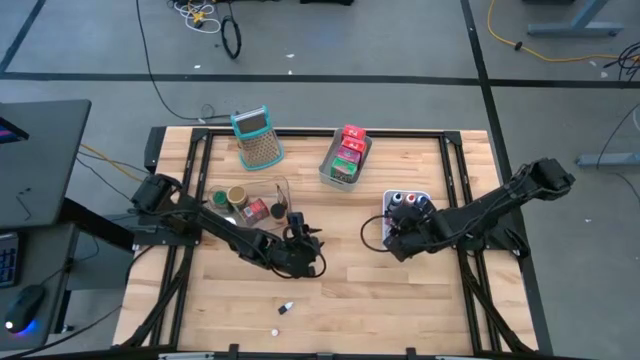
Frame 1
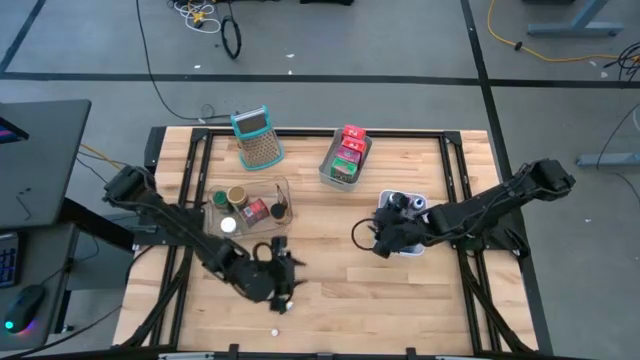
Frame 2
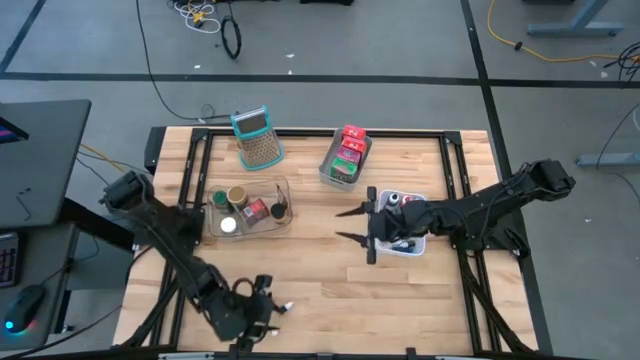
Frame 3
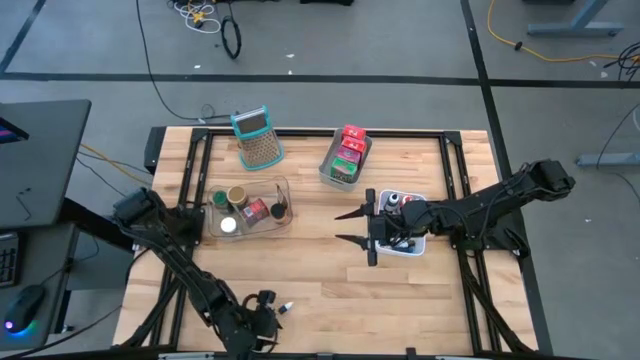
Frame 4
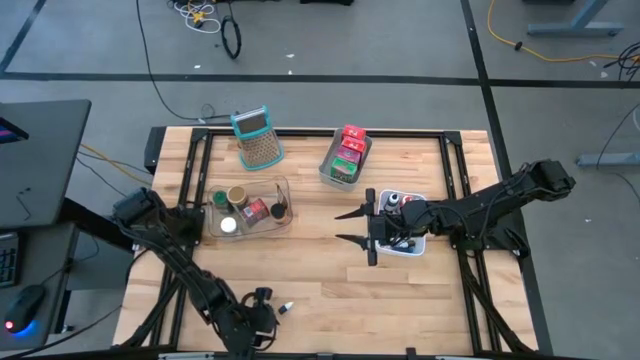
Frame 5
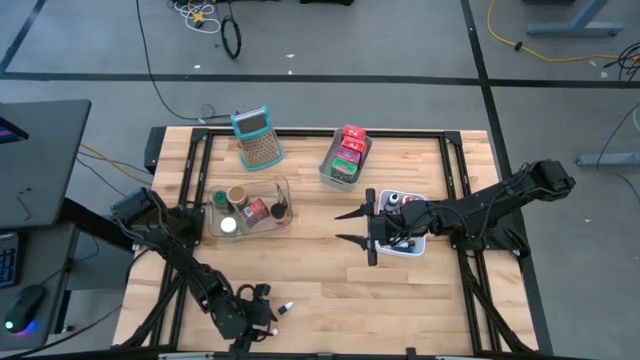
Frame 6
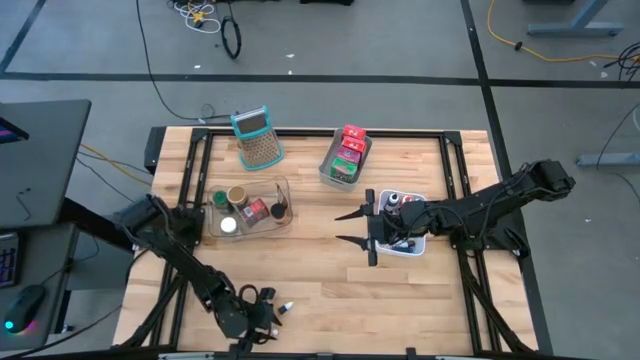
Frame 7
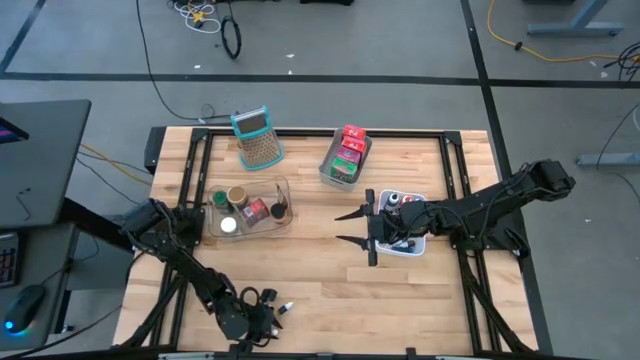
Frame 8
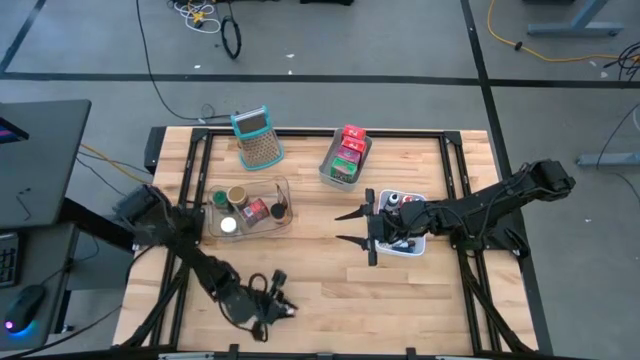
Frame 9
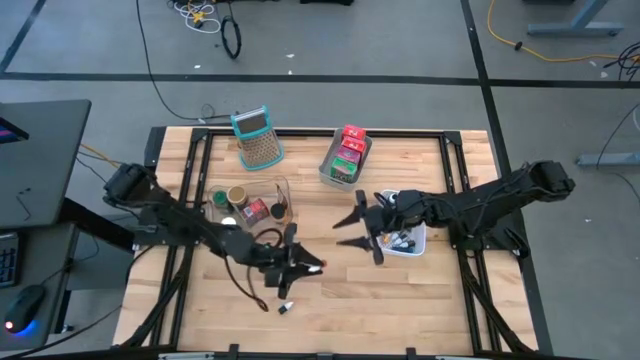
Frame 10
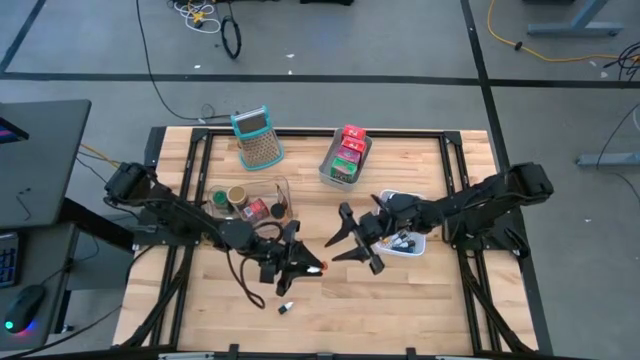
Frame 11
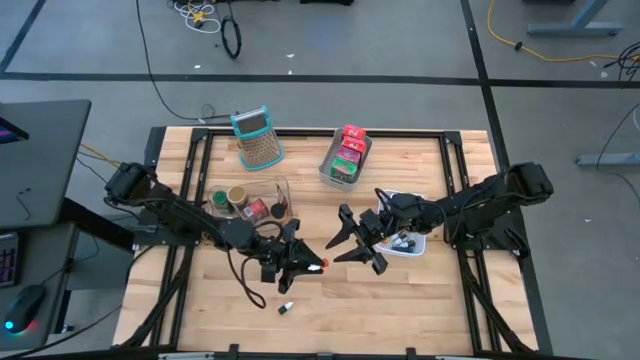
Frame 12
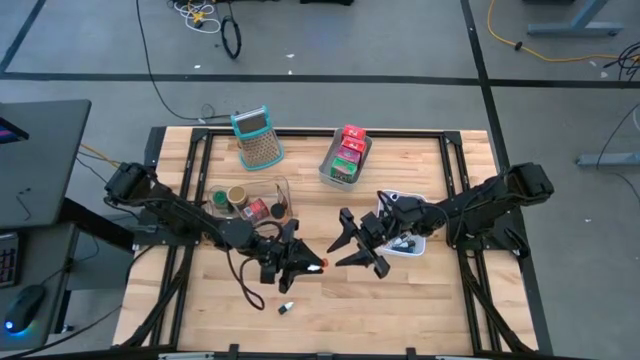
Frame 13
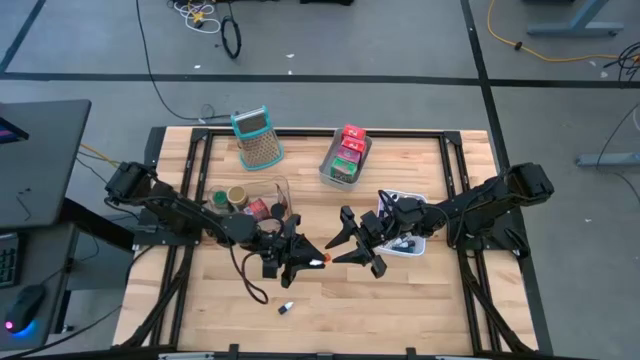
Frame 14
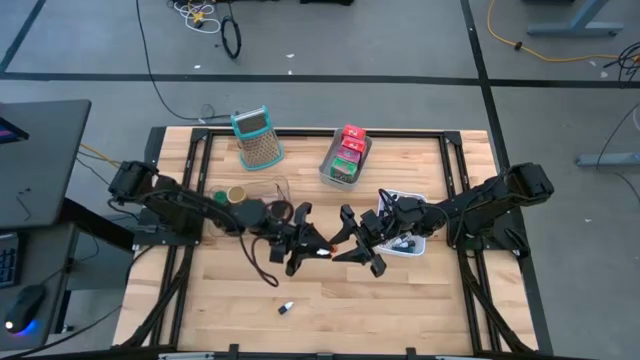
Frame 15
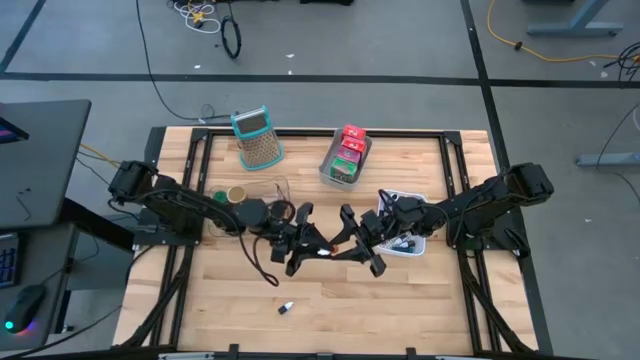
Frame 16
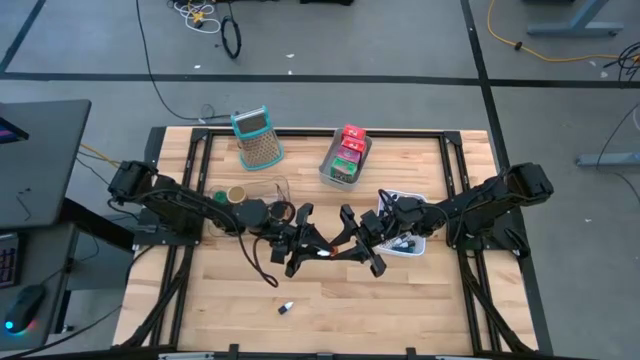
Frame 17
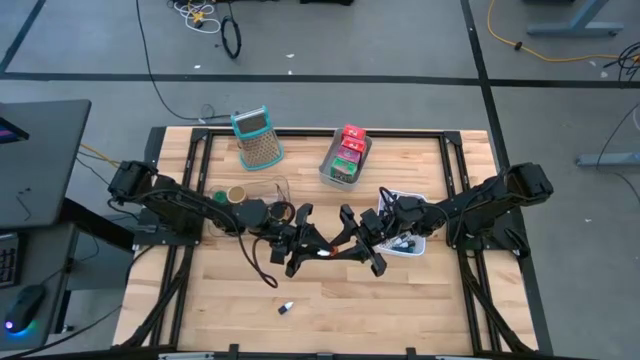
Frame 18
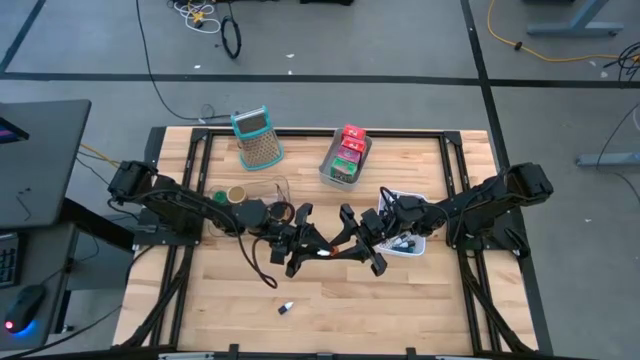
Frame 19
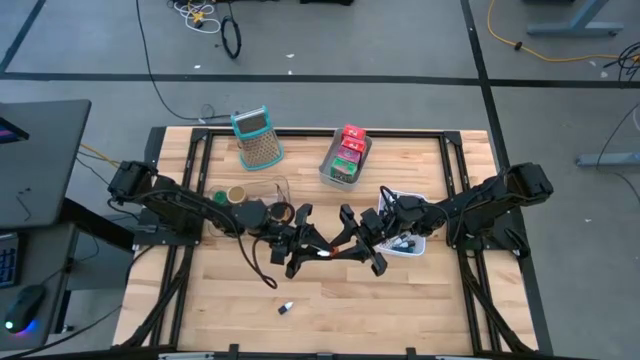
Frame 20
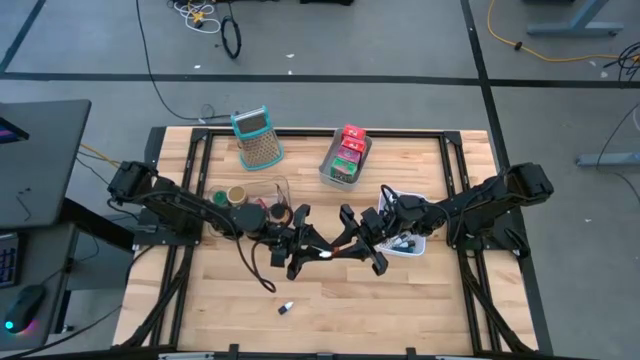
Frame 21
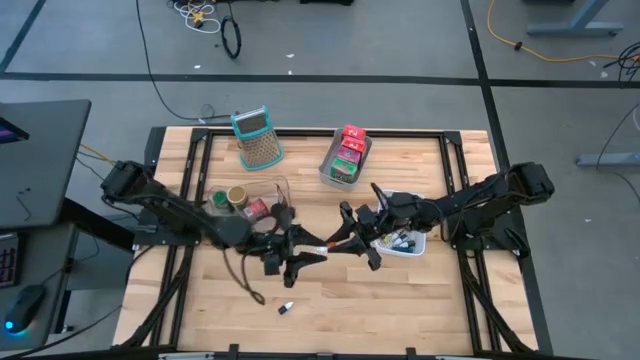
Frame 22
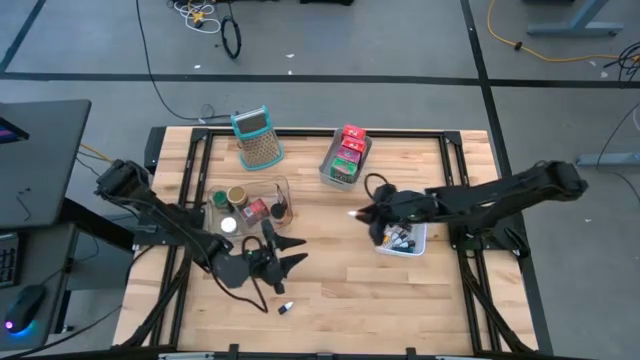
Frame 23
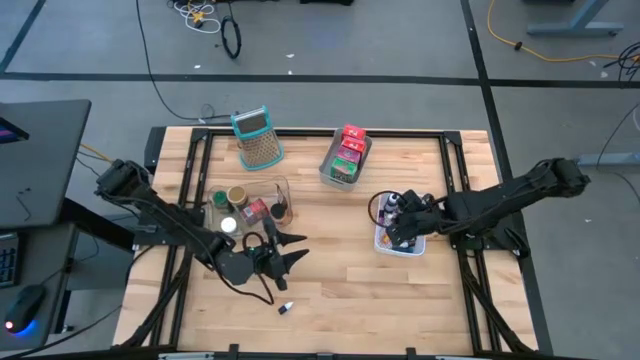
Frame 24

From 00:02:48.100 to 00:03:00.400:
Task: Pick & Place Kitchen Items
Put the orange food coloring bottle into the white bin

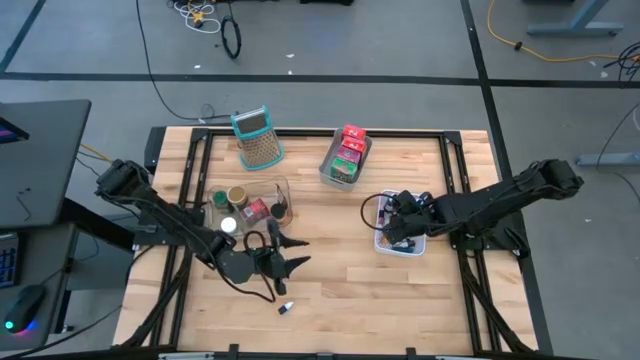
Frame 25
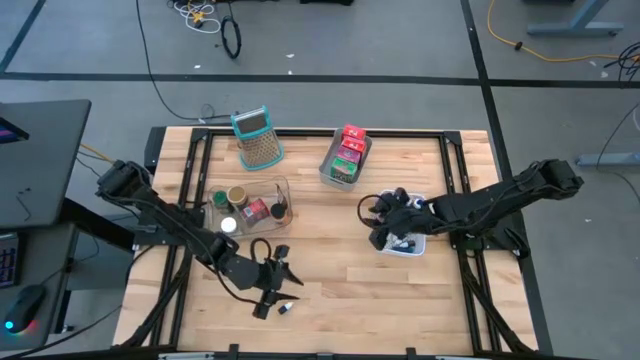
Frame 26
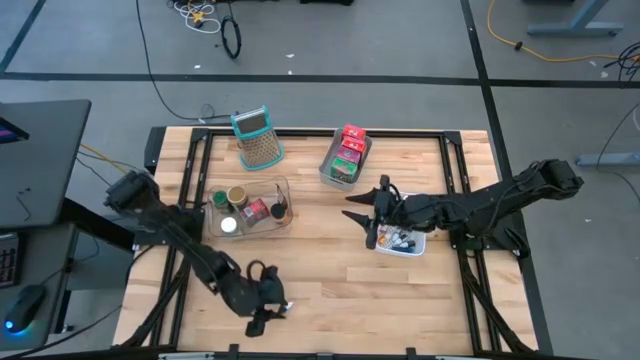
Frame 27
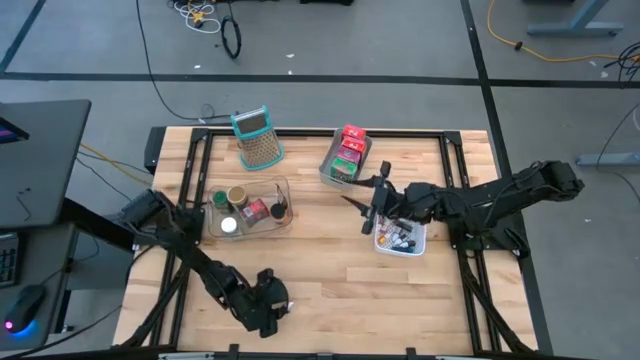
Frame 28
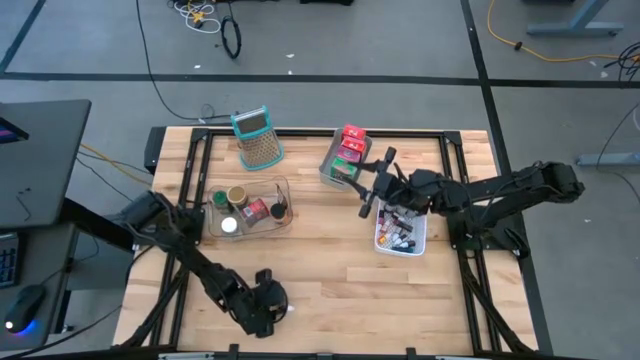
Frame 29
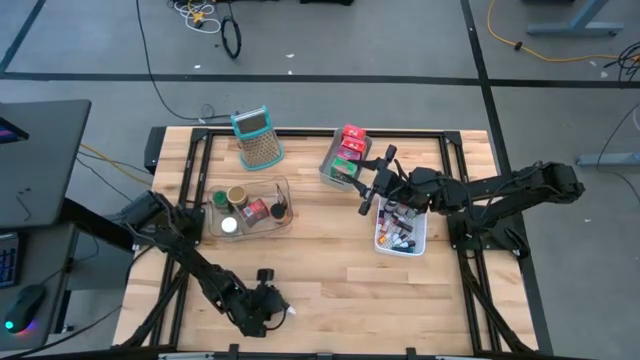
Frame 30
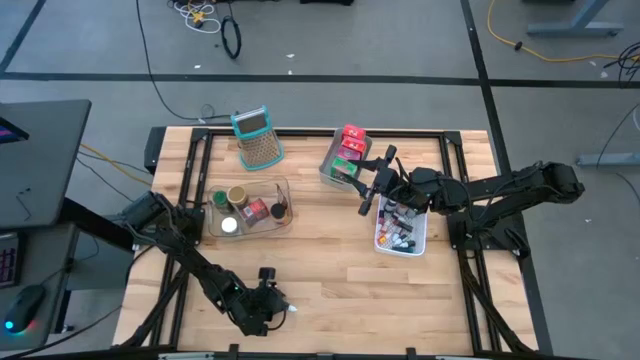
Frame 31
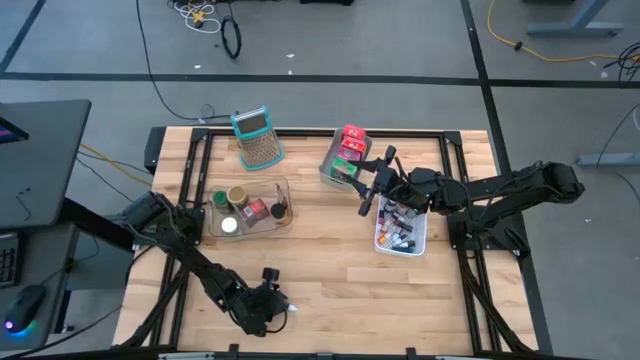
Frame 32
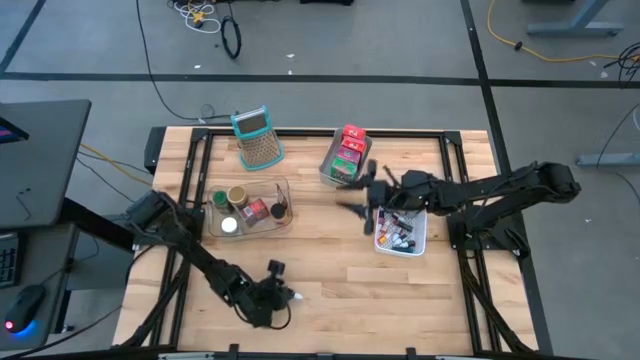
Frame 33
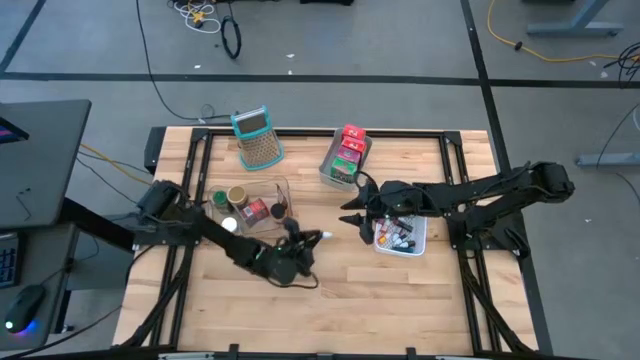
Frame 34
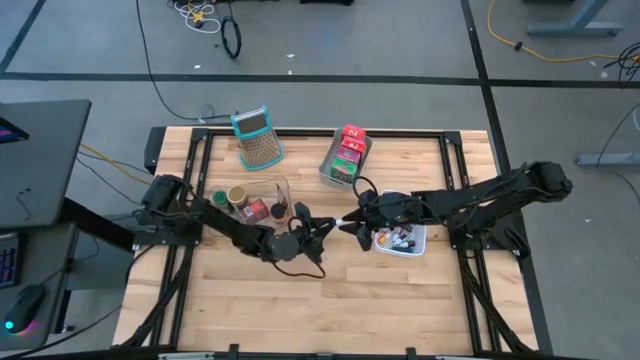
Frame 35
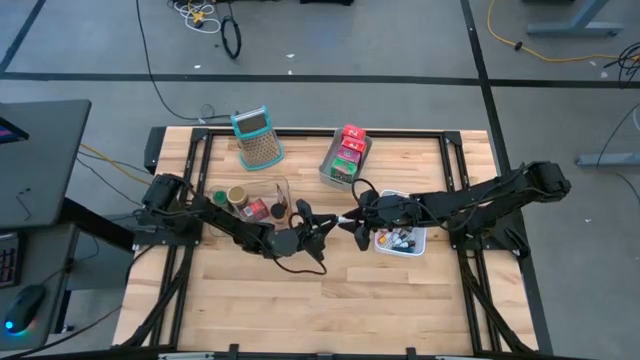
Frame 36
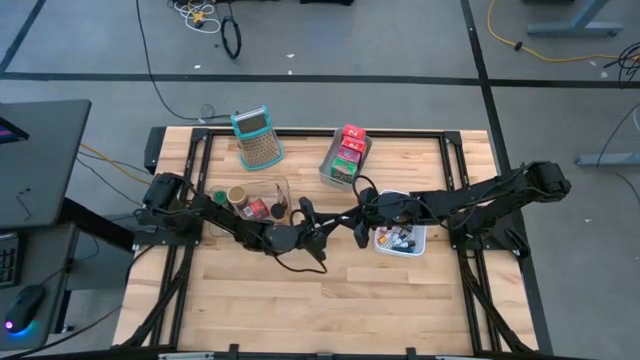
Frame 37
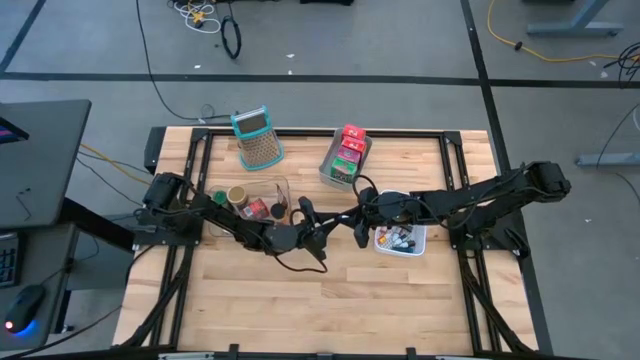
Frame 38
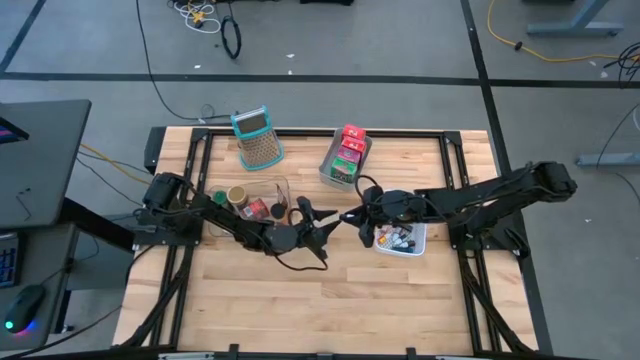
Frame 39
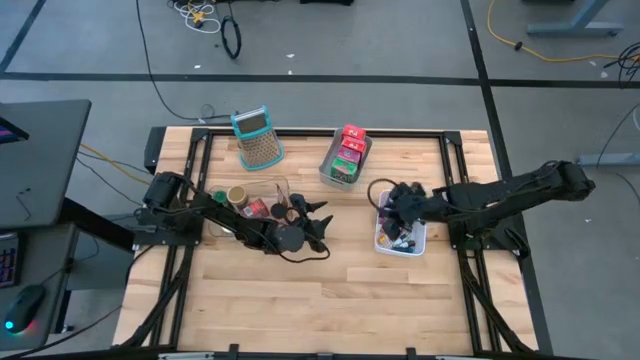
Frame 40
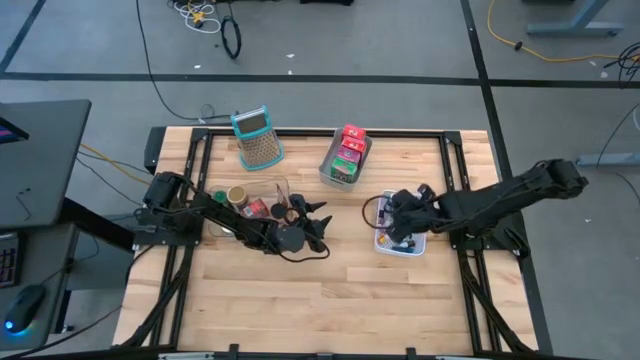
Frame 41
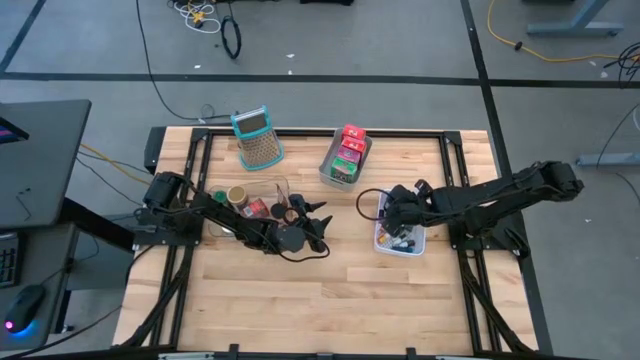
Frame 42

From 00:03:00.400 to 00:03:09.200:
Put the black food coloring bottle into the white bin
